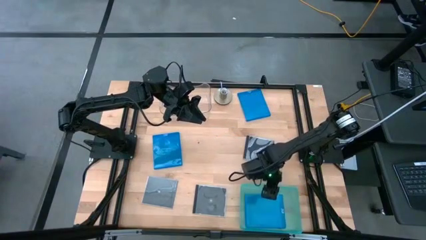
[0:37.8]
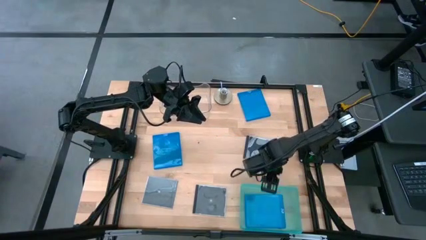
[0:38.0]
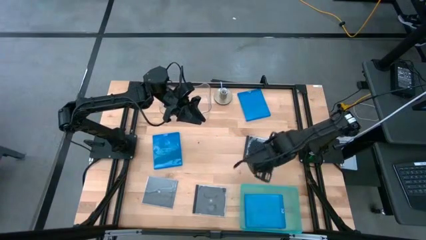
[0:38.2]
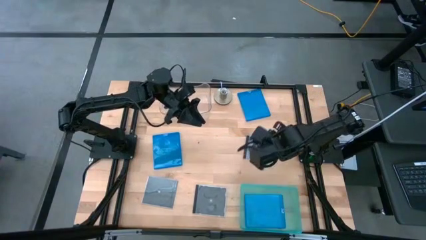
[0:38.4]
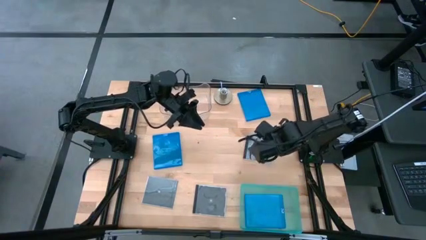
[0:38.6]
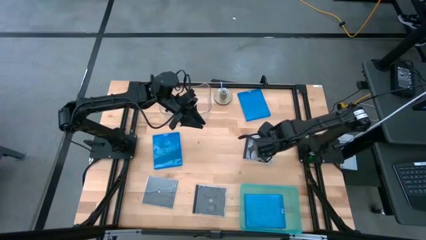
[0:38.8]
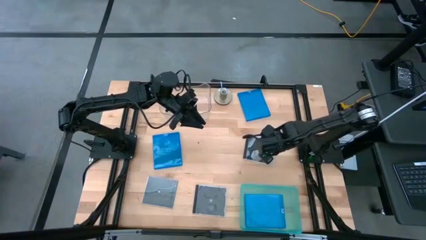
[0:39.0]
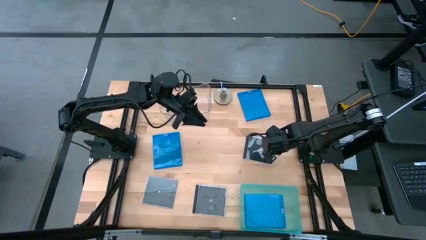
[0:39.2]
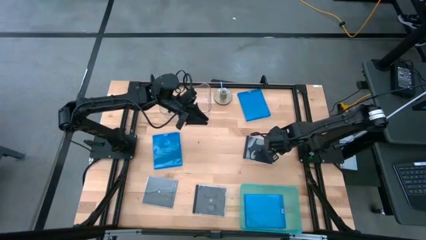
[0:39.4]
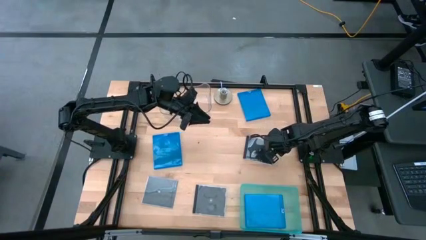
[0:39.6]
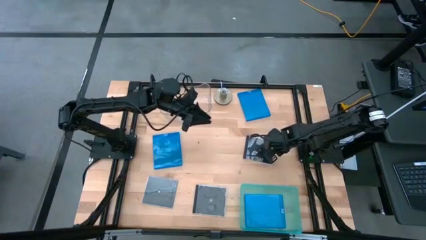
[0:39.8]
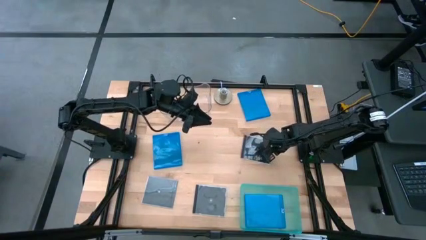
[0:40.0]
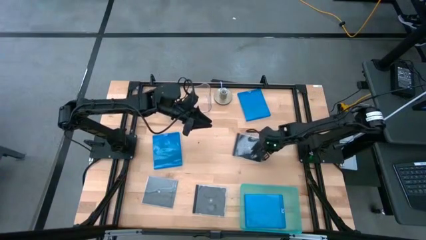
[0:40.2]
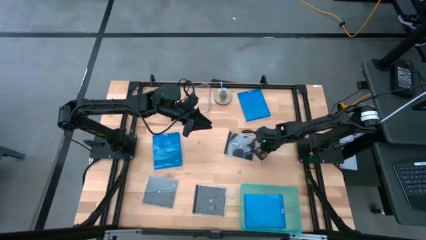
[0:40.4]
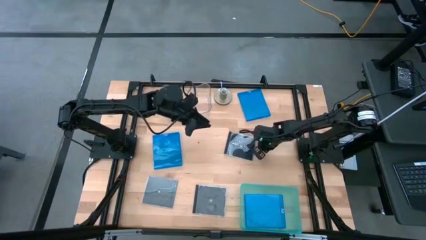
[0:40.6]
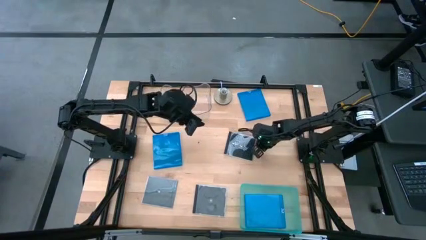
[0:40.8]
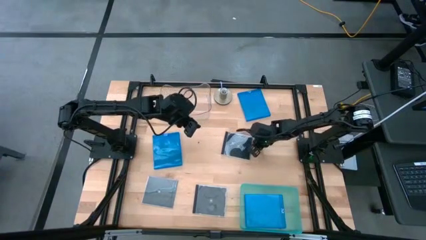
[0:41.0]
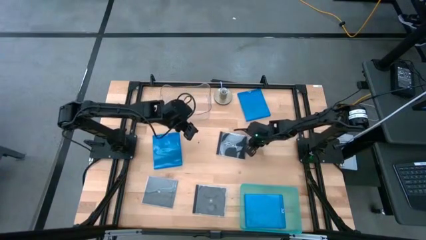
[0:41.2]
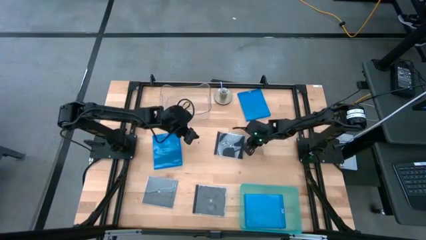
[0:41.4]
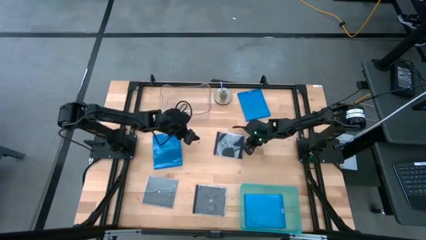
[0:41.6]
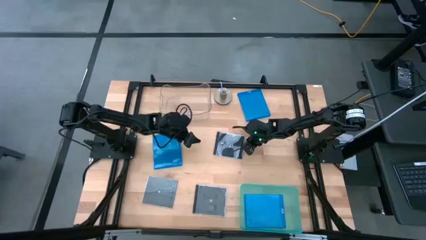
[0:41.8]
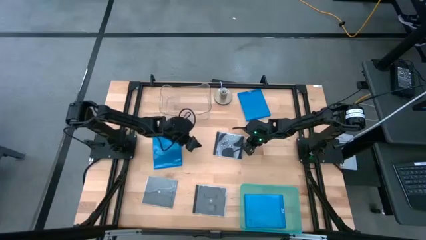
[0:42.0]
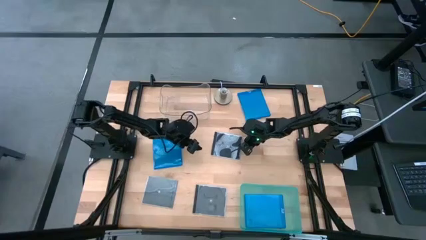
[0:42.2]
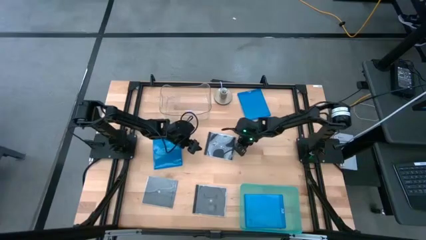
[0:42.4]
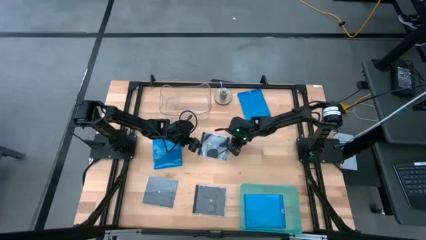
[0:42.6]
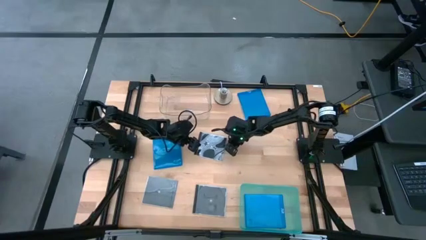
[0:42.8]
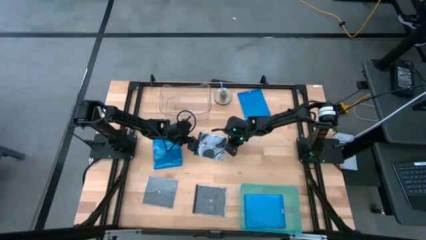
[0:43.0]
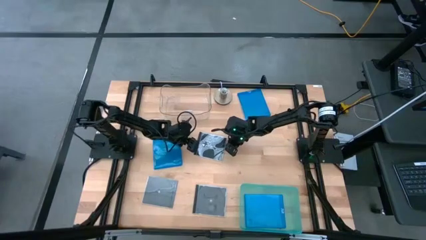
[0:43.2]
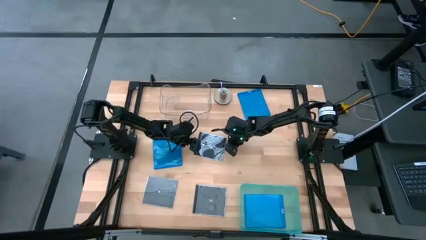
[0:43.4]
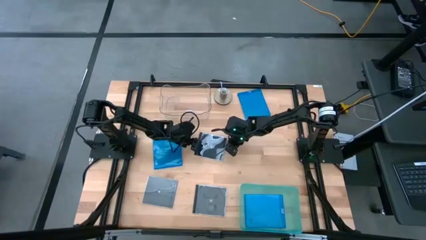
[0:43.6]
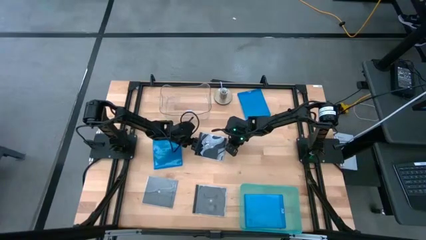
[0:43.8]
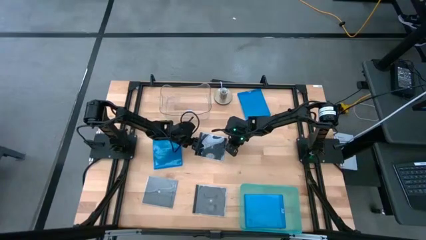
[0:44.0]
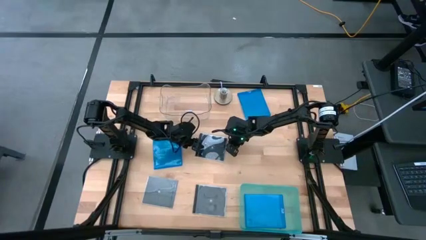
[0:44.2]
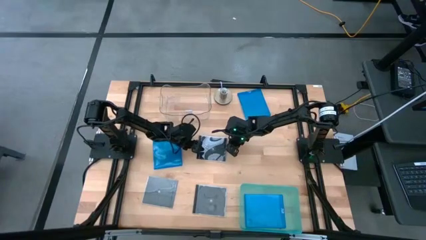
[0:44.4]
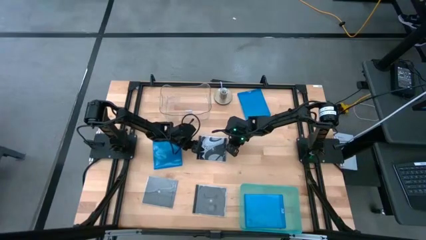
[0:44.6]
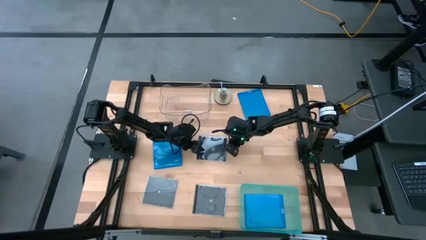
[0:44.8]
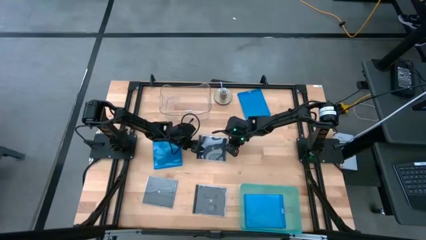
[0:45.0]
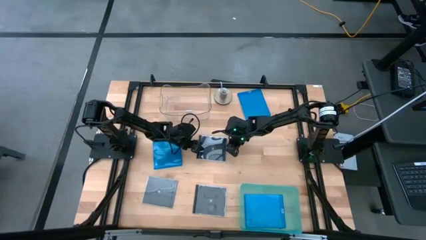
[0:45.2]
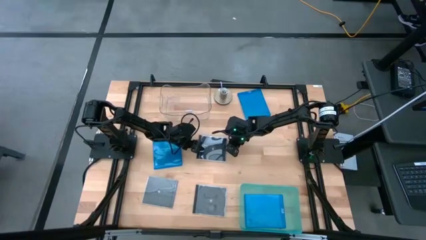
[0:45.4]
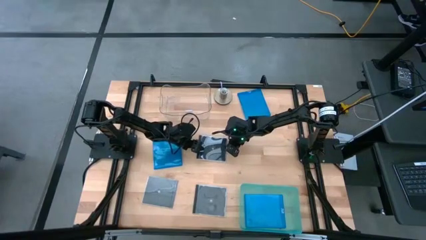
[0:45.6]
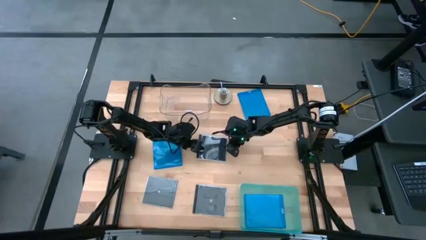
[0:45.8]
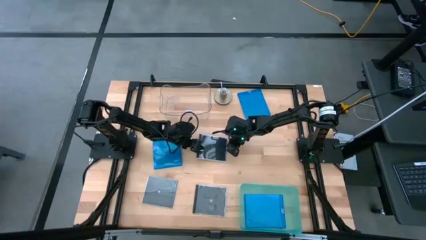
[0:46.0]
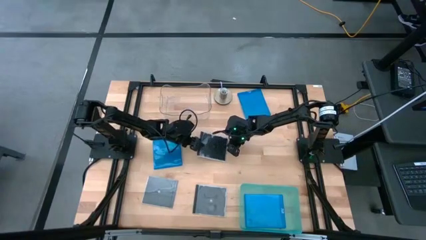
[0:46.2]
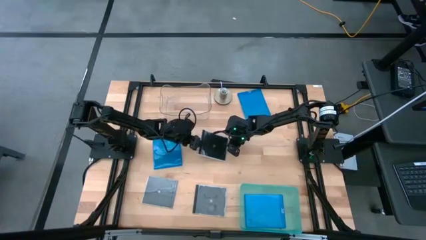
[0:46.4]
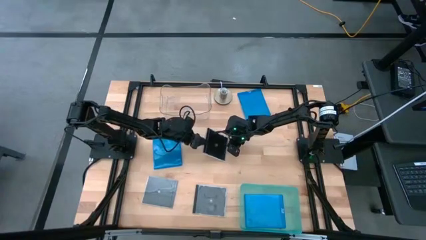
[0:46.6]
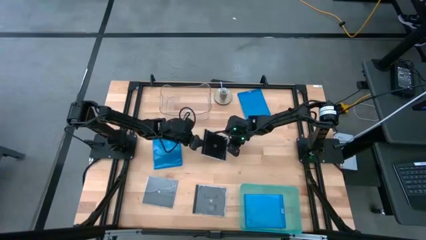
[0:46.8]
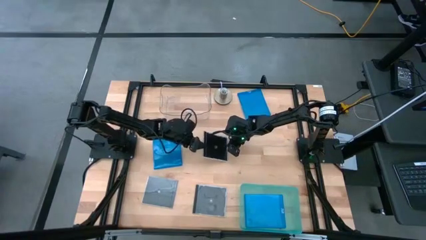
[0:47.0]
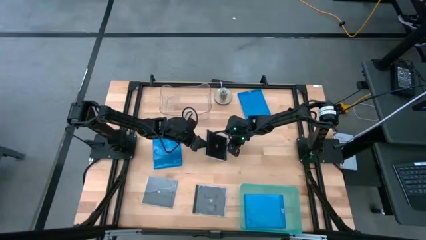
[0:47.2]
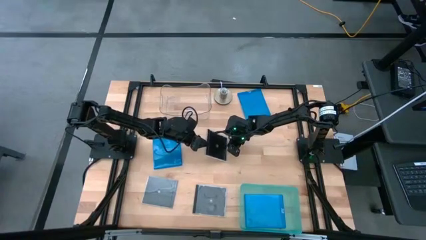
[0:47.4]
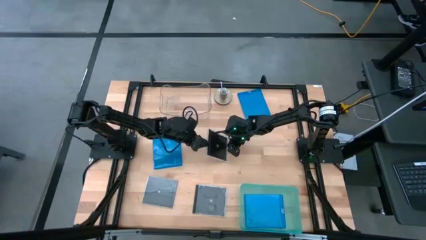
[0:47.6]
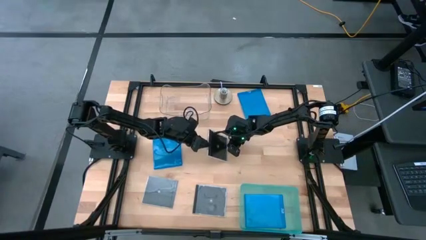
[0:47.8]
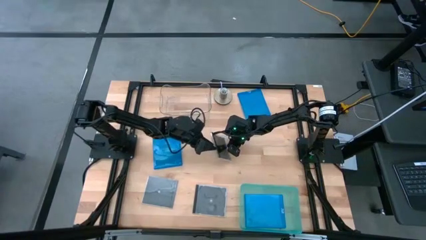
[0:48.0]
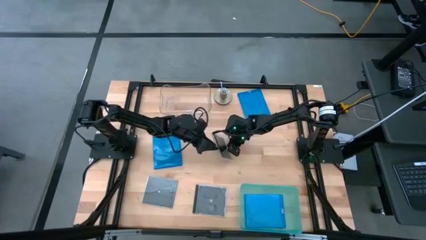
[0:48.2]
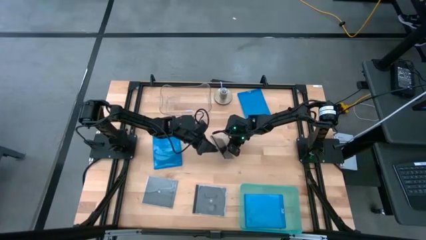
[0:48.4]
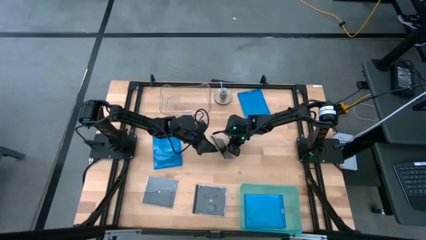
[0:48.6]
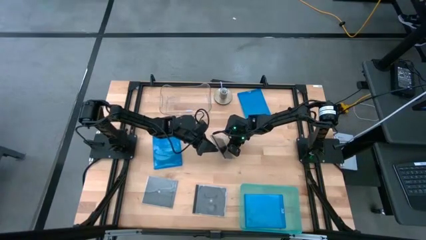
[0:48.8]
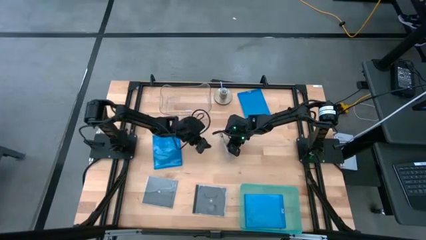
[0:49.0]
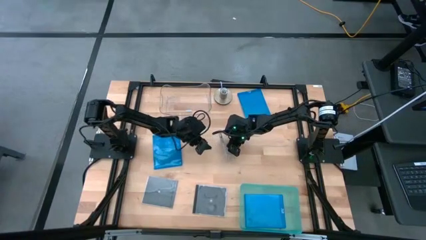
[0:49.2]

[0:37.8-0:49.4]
Task: Pick & place jewel cases by type
Put the top black cd case into the transparent bin
